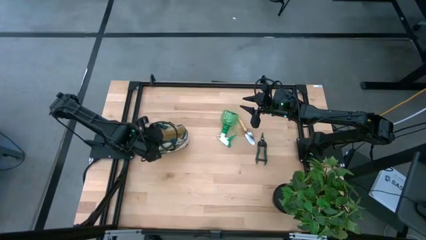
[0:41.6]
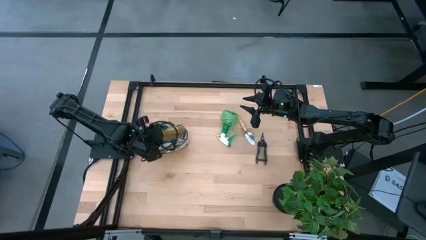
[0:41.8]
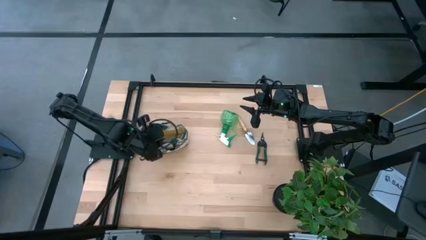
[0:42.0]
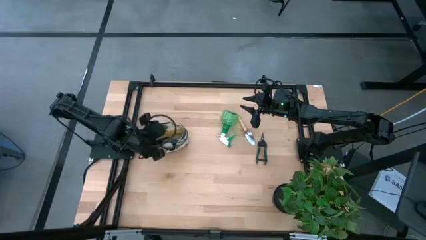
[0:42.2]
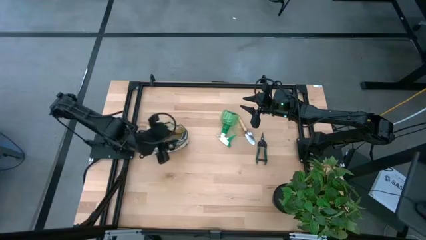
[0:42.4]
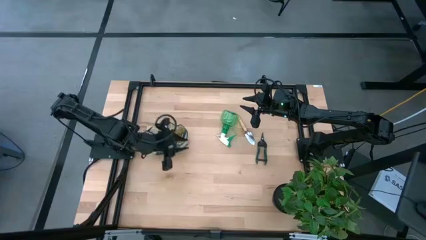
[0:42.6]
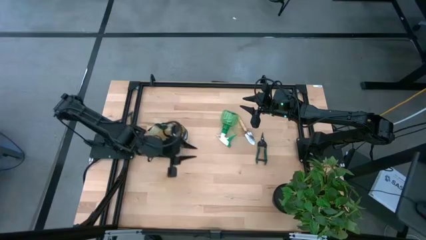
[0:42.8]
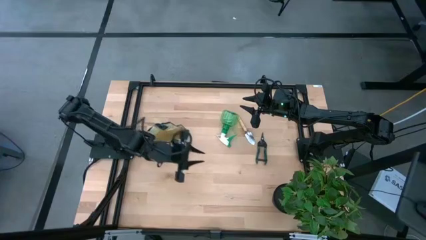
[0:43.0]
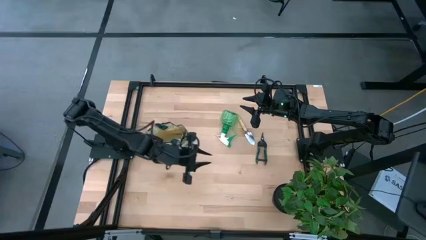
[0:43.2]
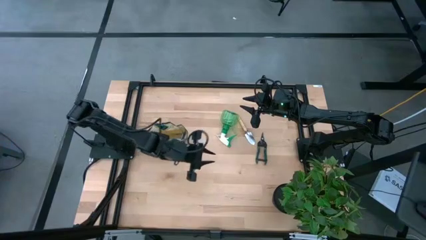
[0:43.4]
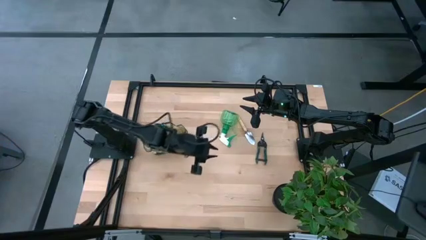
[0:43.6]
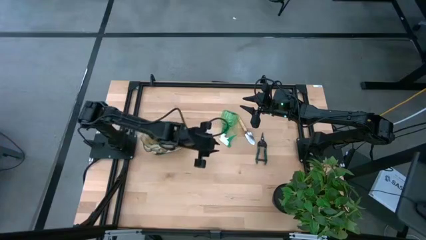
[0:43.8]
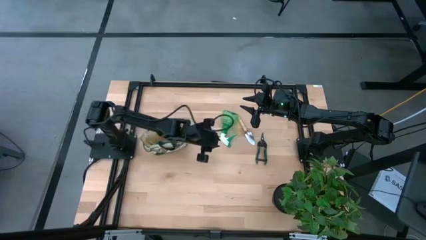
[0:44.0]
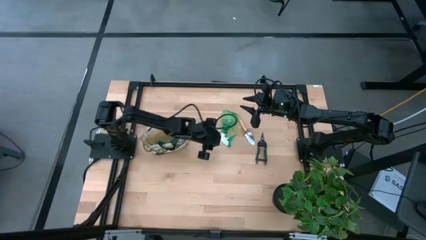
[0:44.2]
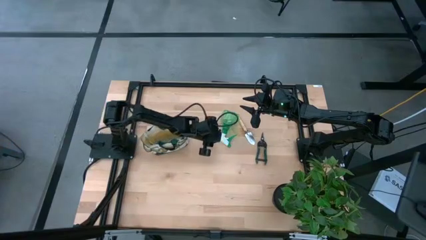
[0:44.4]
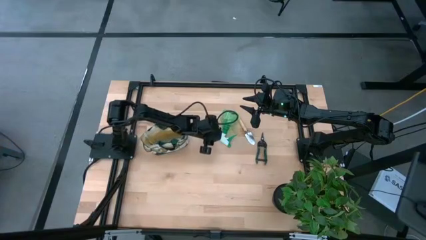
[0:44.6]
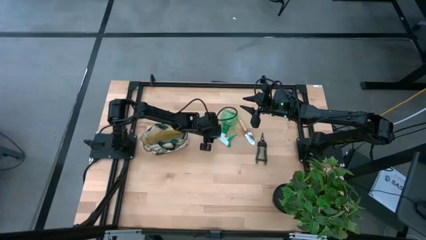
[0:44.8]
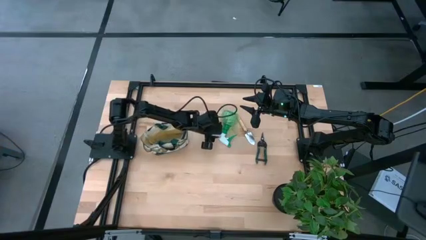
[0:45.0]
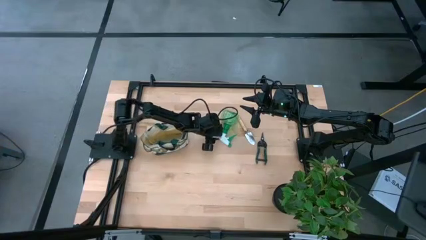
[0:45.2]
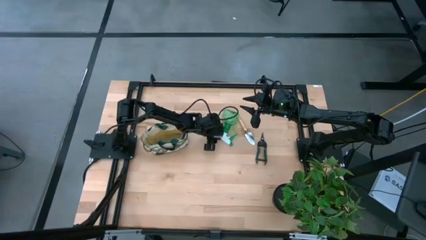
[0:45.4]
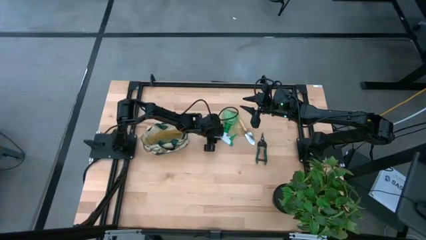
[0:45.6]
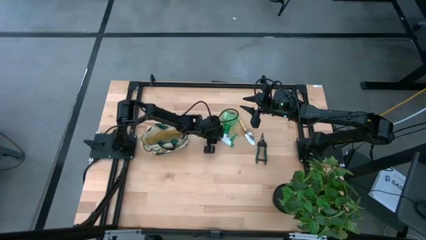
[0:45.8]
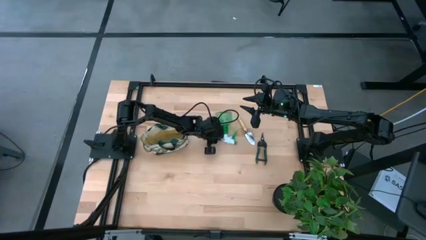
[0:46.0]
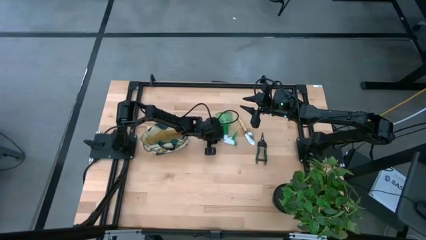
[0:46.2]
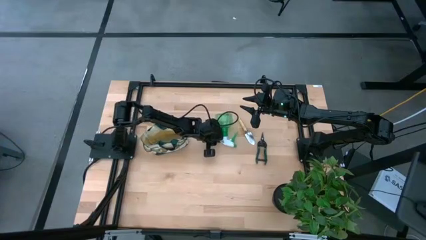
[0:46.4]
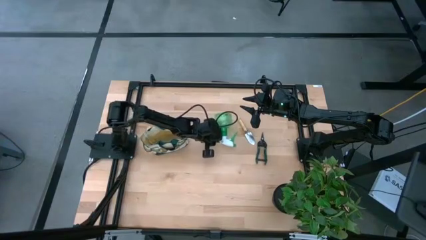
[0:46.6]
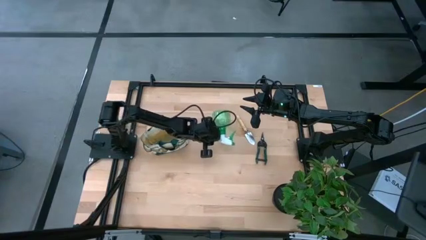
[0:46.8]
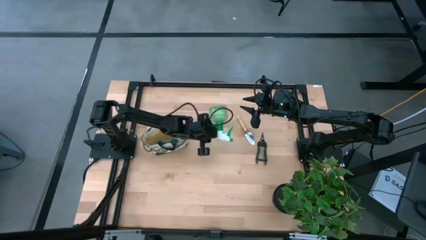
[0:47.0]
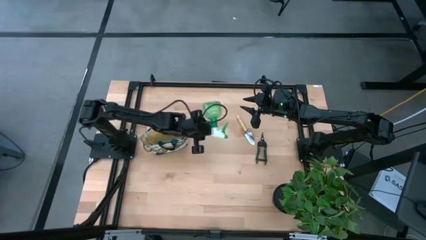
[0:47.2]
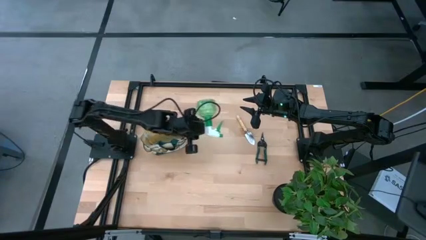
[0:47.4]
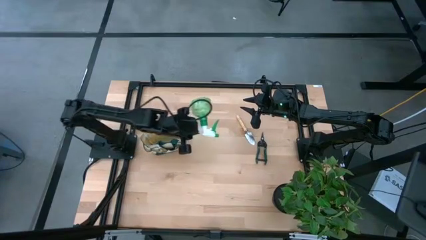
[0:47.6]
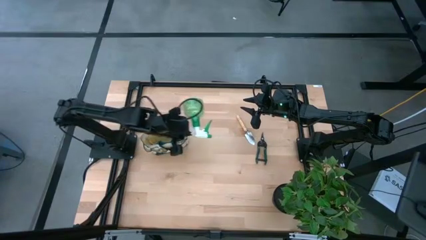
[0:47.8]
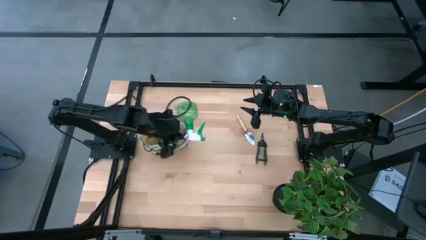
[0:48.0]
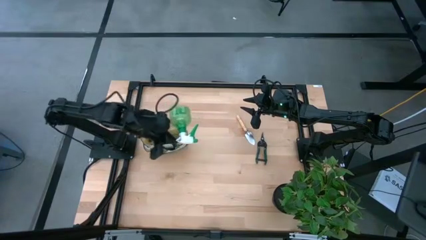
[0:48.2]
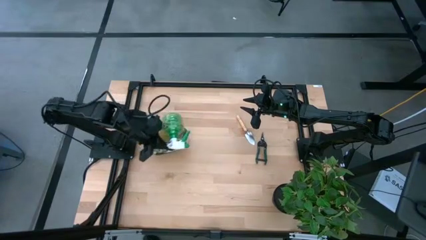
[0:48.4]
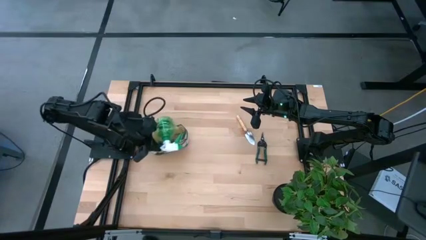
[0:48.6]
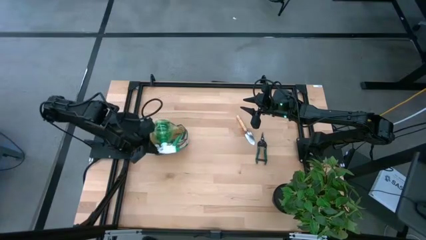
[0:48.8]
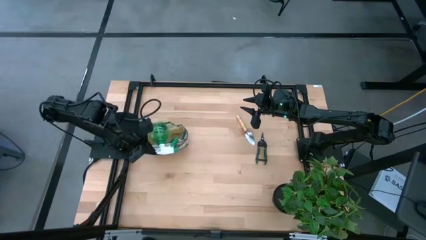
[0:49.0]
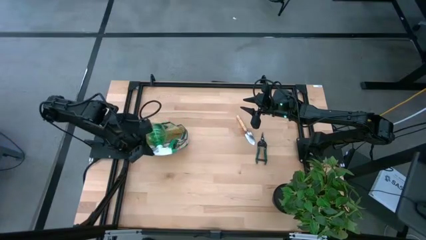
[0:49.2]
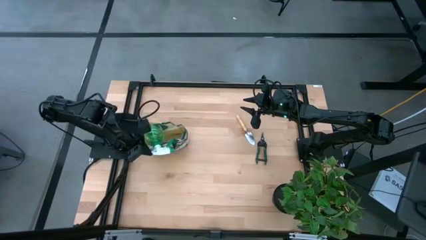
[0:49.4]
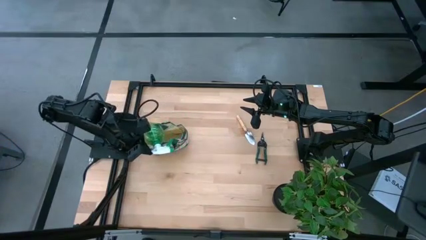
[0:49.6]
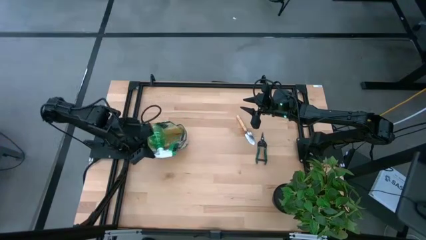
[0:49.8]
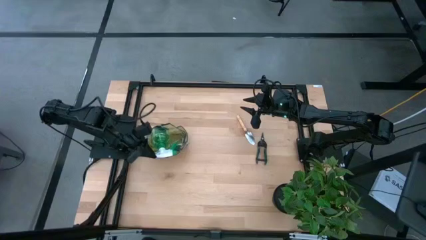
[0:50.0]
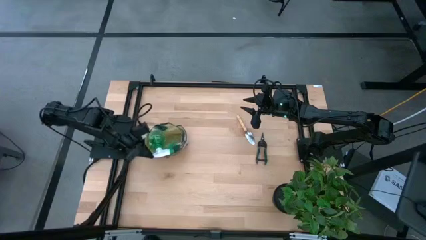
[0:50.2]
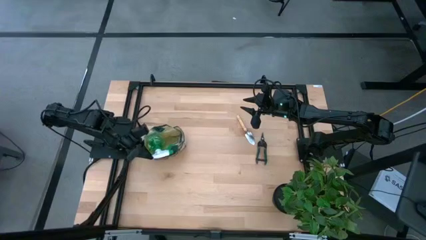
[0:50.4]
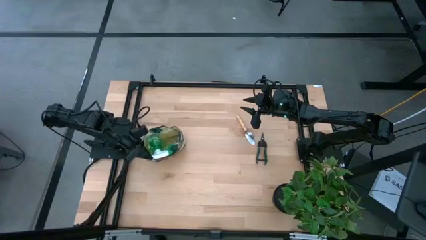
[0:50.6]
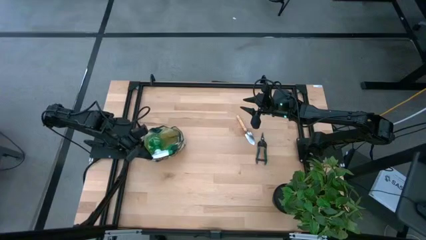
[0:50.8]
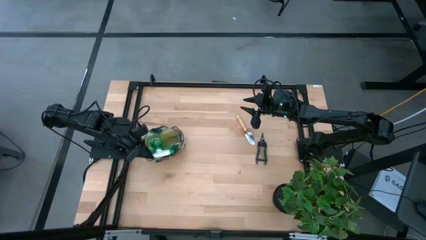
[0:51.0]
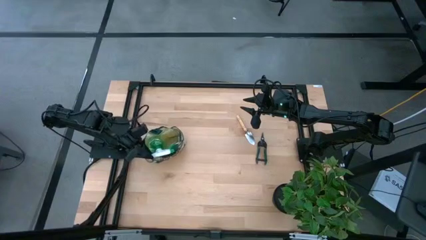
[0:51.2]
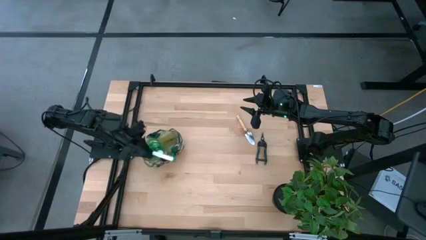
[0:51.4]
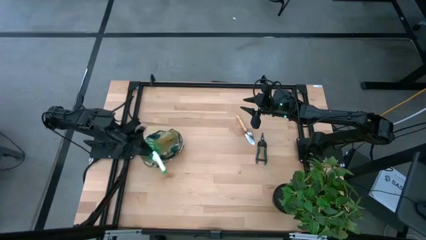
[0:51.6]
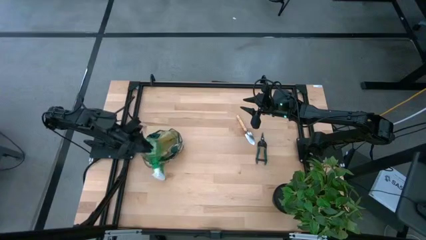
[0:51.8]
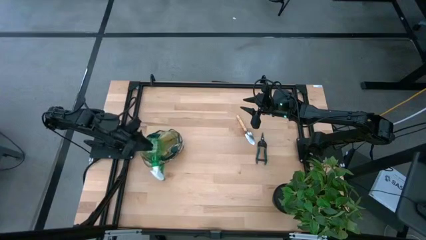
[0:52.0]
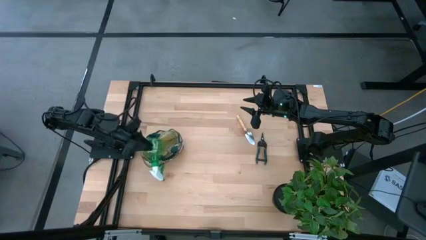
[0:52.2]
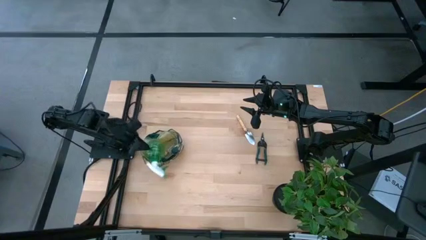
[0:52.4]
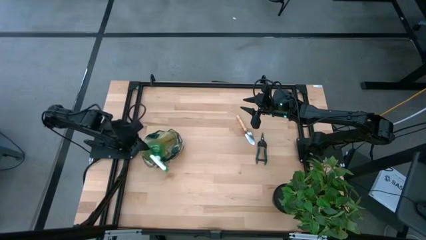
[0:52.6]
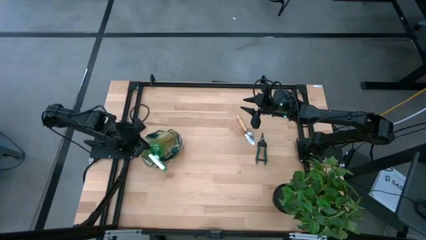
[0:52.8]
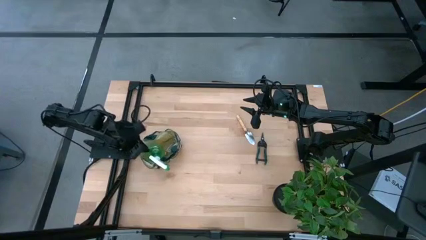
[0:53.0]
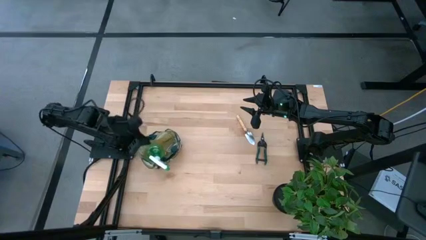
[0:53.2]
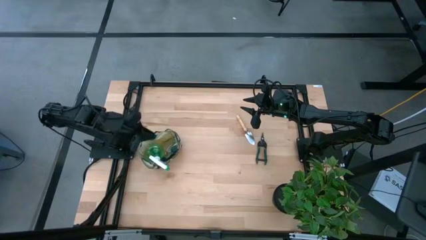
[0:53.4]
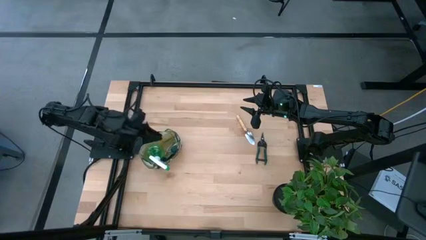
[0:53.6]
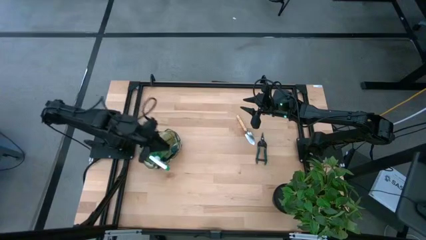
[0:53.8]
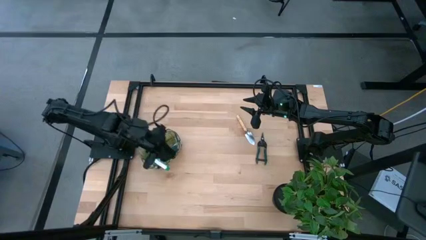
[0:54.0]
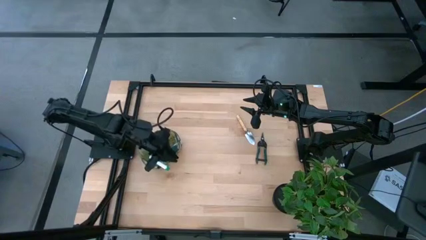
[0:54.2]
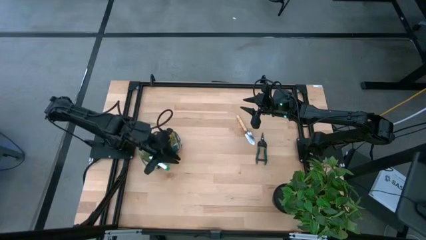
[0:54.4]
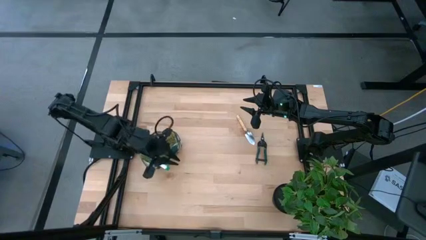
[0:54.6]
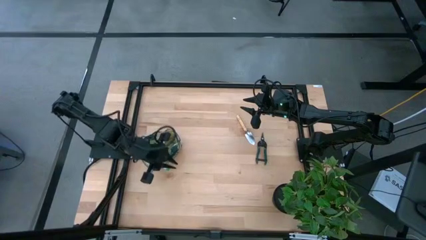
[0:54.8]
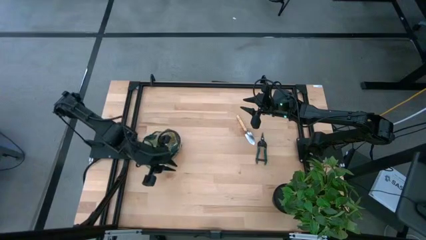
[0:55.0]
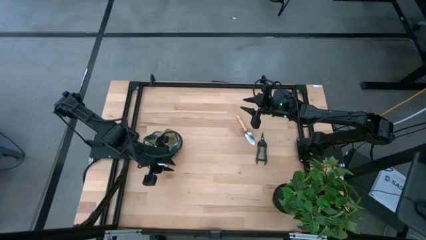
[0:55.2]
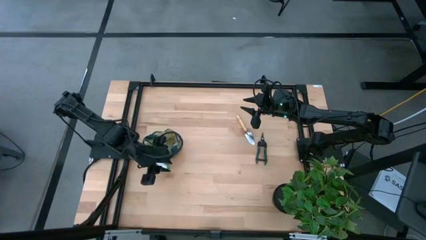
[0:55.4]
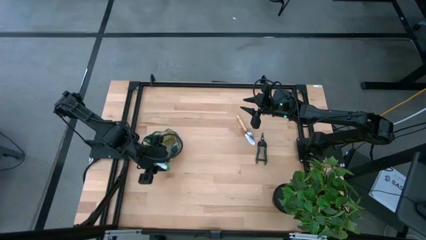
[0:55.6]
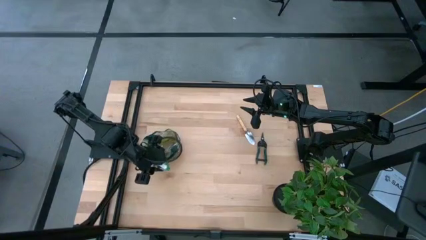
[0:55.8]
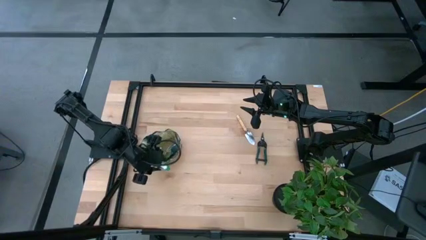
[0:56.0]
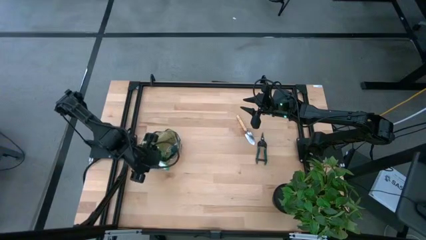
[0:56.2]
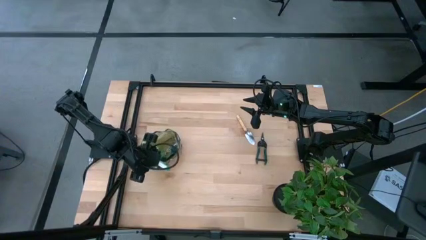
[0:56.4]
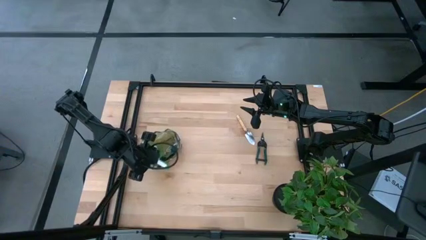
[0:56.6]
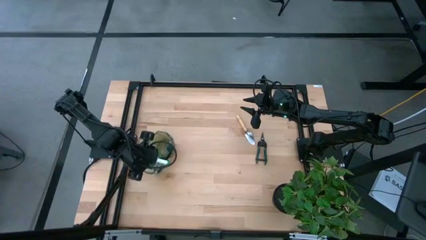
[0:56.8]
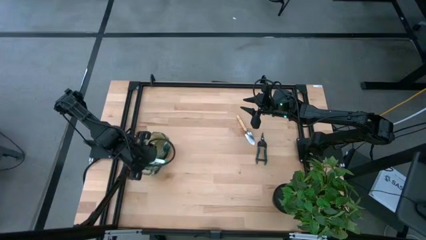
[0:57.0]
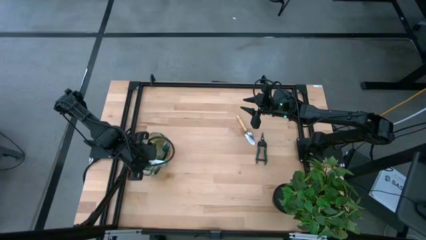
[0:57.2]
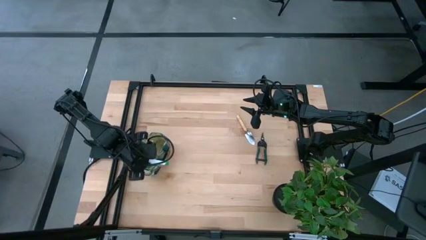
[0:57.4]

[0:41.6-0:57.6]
Task: Pick & Place Garden tools in Gardening bag
Put the green spray bottle into the gardening bag
